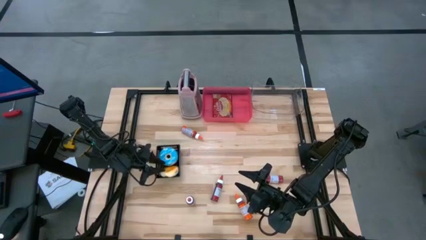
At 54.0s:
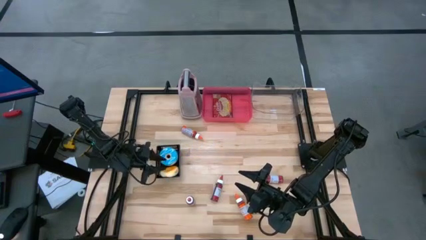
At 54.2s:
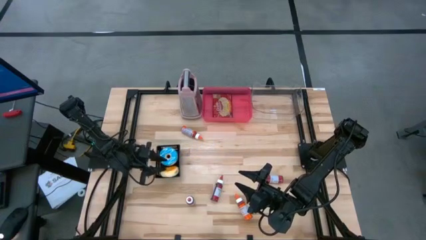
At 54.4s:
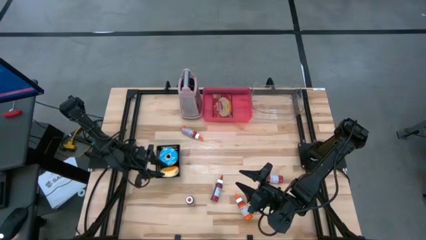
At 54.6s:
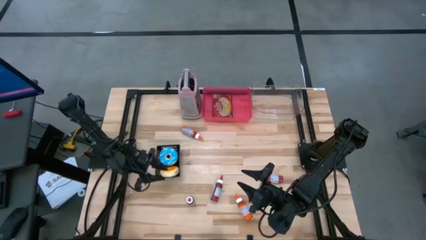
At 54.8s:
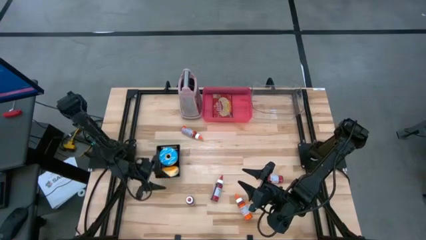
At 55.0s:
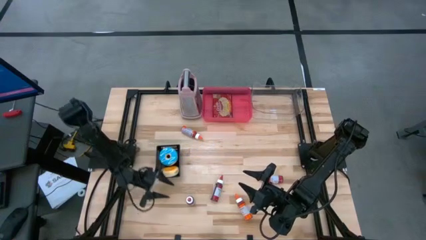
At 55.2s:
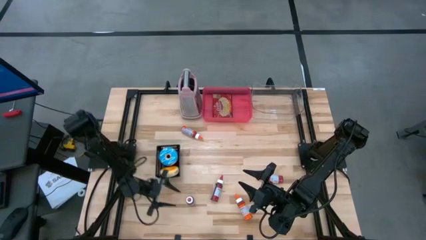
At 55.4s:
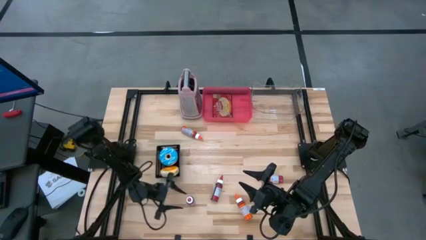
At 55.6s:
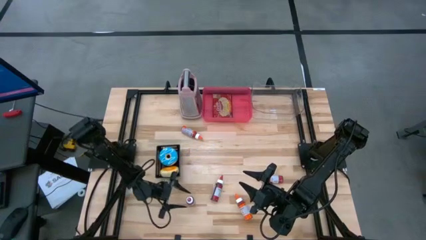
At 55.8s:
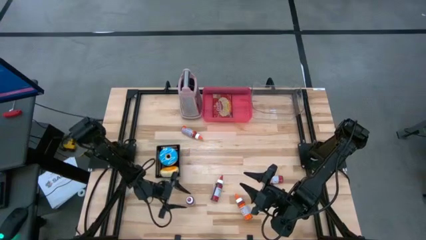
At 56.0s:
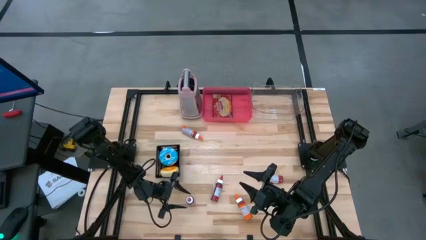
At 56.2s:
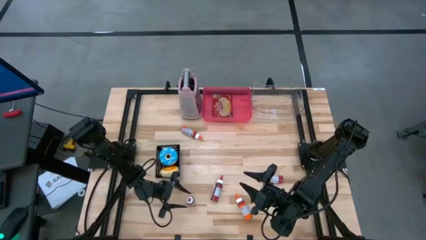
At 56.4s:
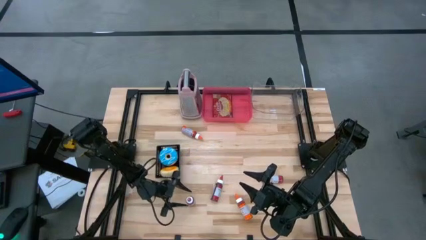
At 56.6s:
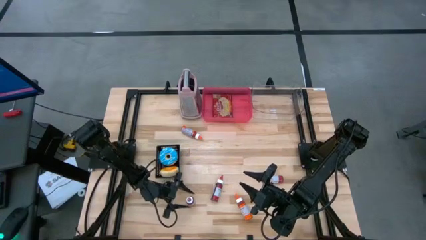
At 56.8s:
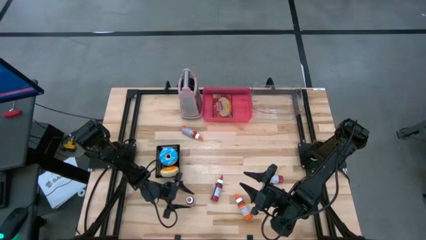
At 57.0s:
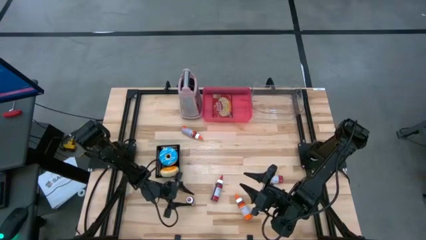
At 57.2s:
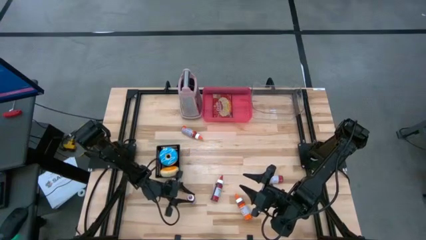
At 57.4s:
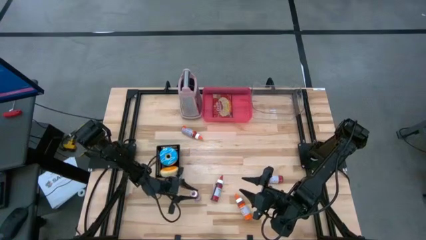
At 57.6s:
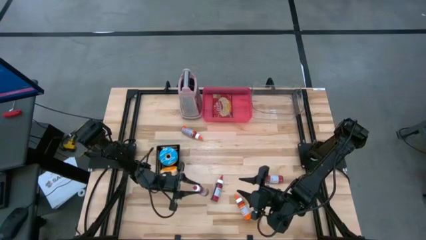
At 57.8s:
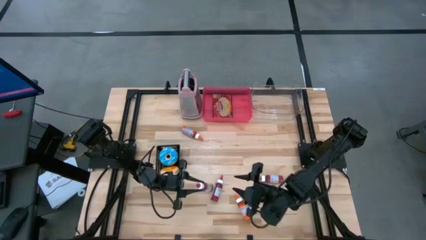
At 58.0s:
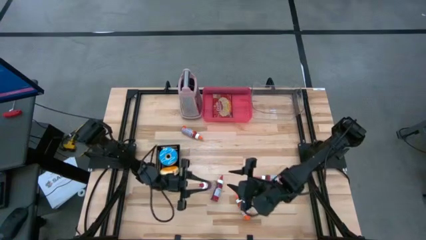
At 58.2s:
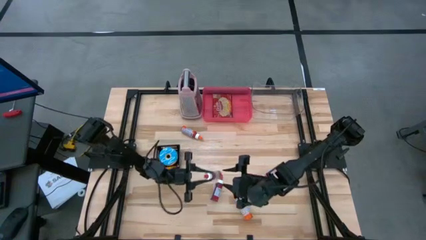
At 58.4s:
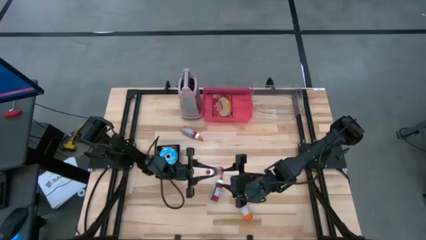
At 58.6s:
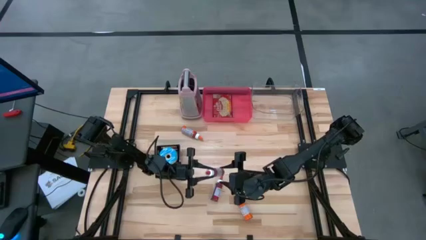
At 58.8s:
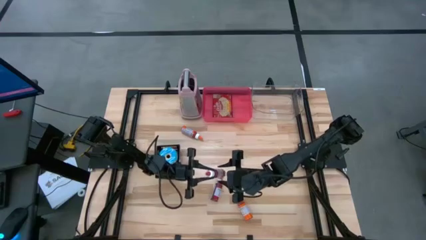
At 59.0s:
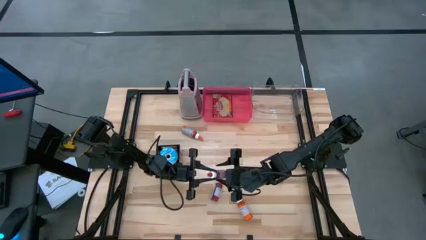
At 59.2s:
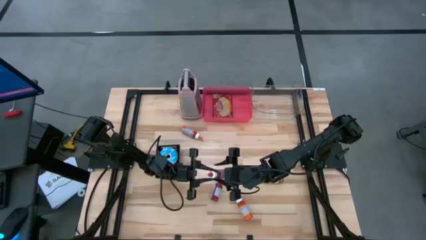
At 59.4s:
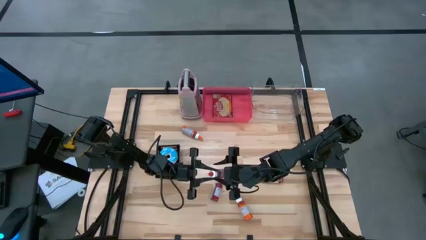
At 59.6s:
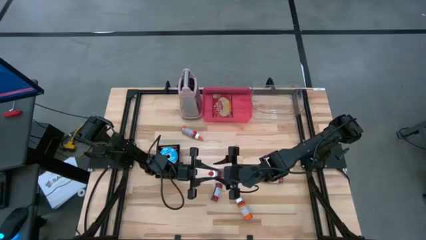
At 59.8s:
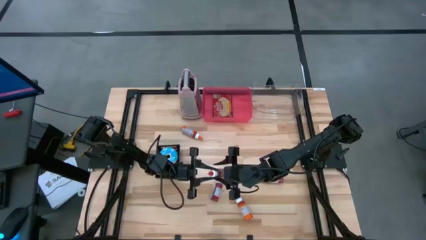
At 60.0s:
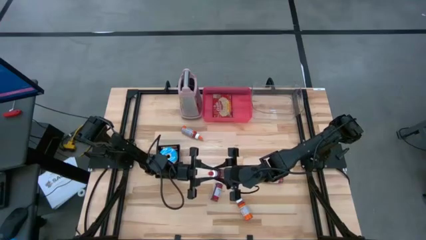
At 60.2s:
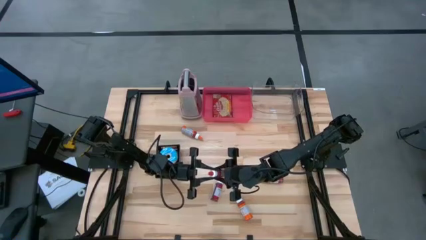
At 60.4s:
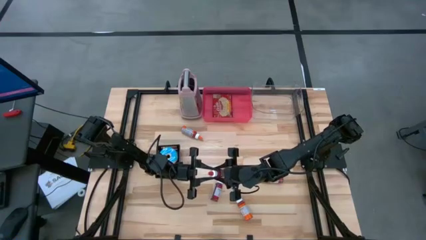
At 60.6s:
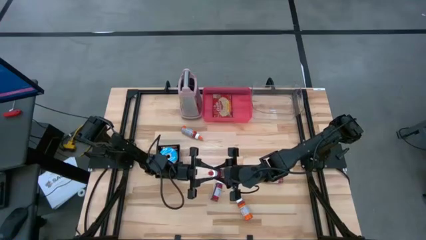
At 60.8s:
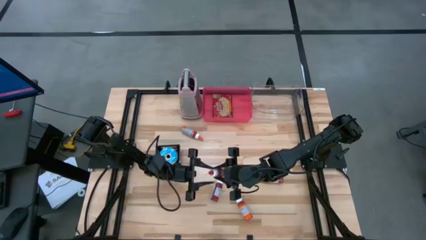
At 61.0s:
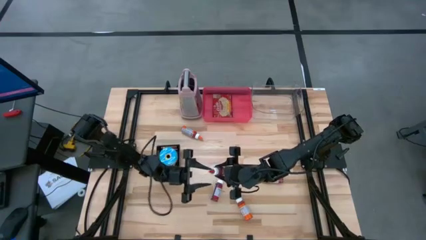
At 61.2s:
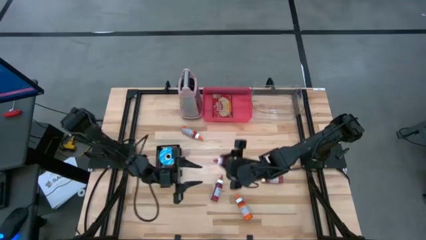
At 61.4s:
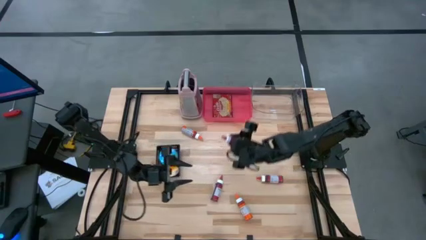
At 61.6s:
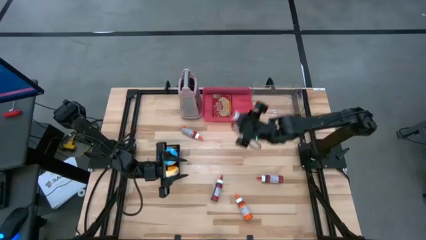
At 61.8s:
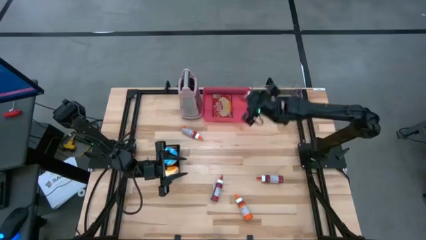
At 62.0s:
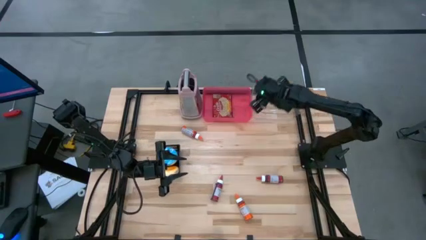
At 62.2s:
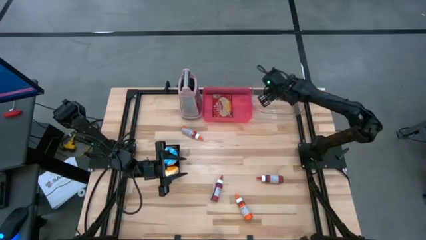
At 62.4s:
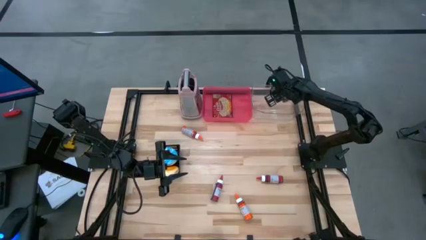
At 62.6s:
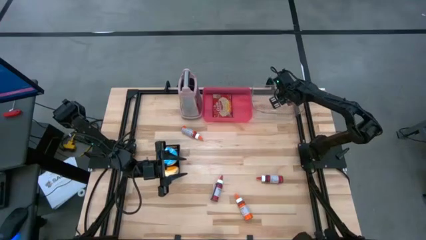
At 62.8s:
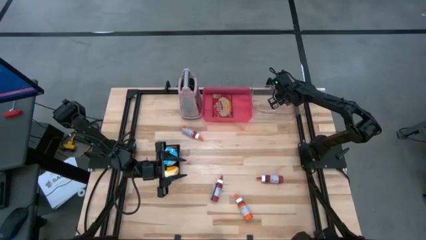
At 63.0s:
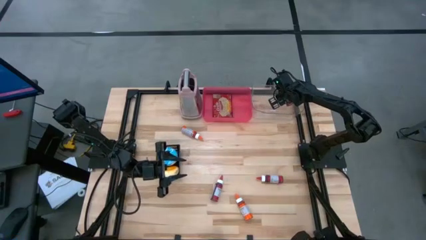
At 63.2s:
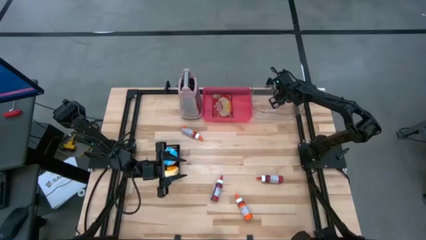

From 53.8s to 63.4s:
Put the left red food coloring bottle into the transparent bin

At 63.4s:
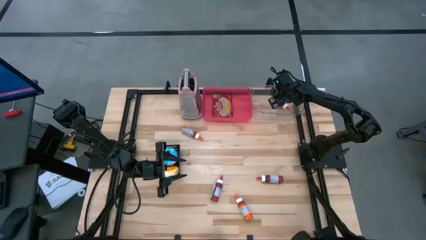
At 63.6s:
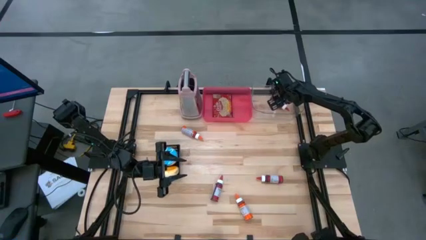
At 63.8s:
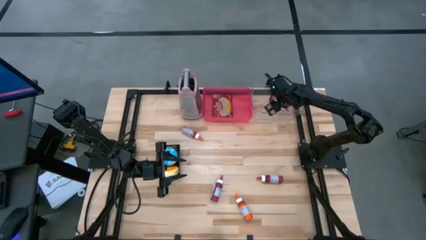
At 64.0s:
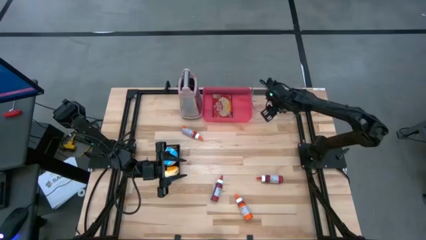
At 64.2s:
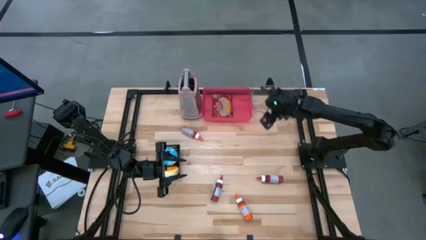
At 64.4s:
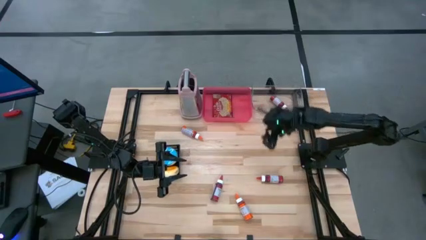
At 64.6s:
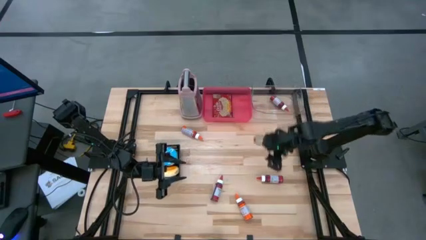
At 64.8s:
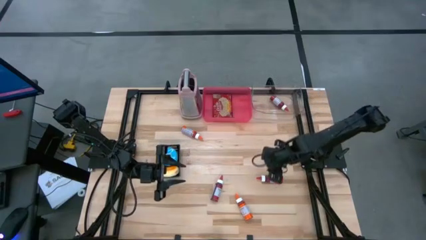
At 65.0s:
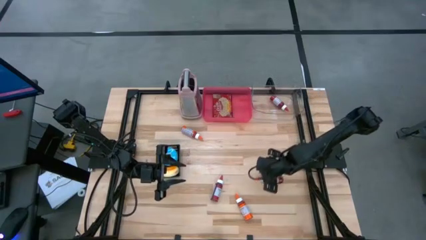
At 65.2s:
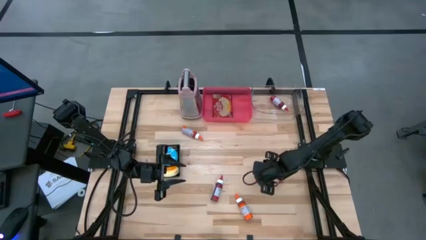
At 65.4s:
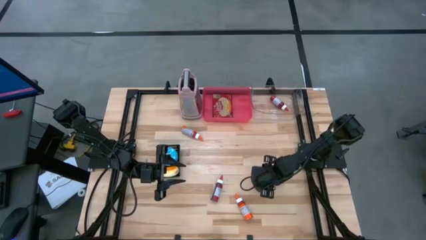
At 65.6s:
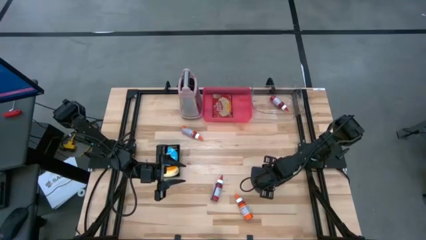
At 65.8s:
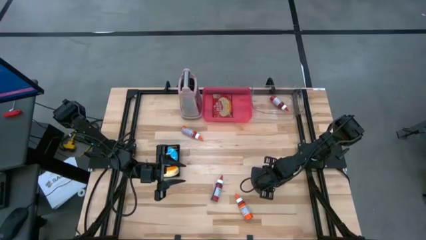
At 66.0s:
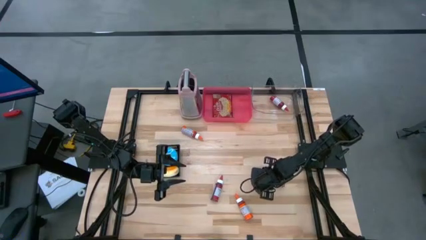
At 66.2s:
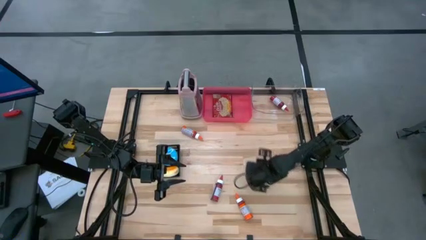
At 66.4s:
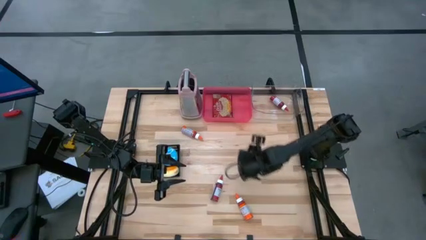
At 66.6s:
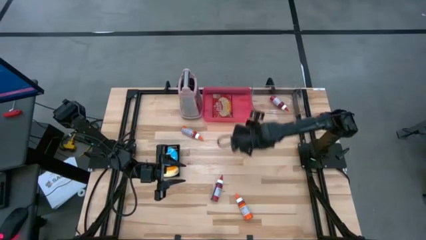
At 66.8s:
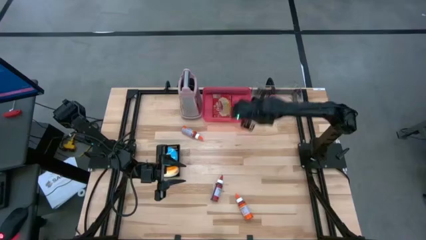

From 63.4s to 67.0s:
Put the right red food coloring bottle into the transparent bin

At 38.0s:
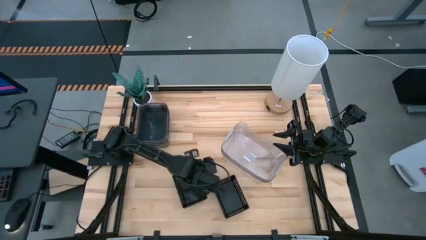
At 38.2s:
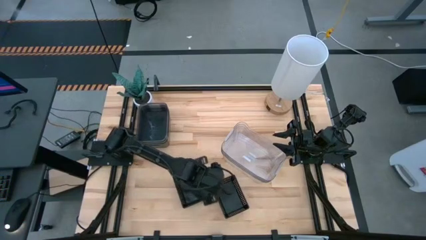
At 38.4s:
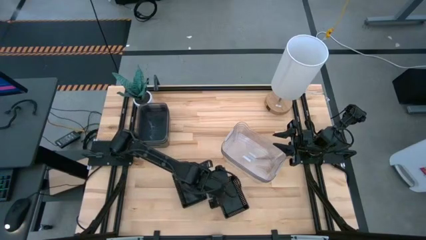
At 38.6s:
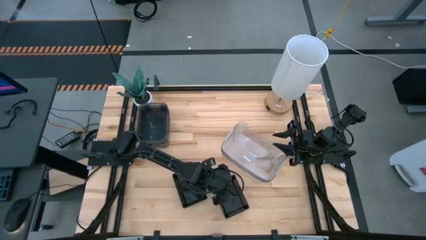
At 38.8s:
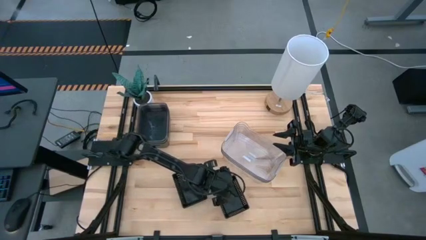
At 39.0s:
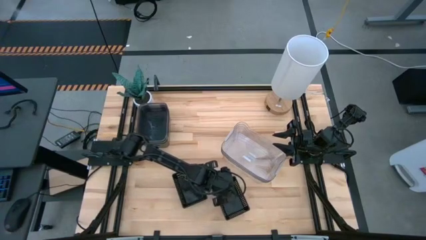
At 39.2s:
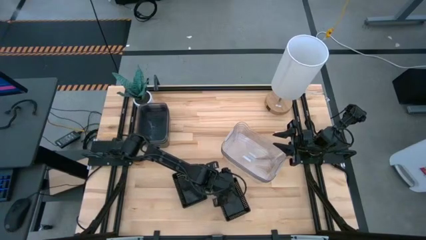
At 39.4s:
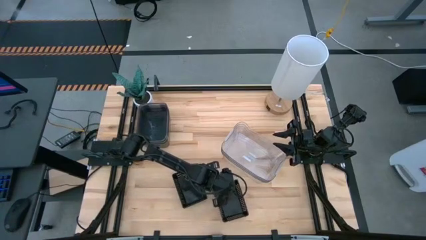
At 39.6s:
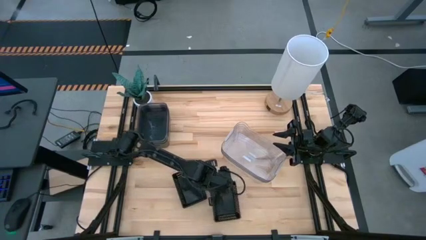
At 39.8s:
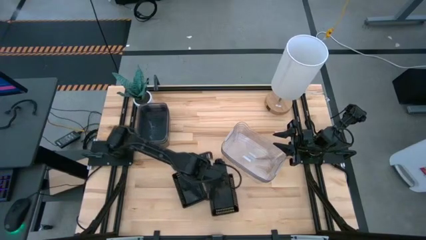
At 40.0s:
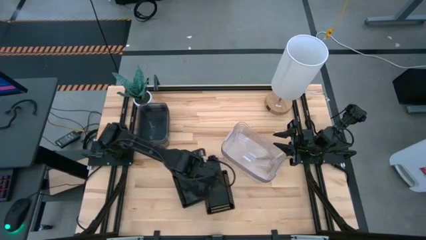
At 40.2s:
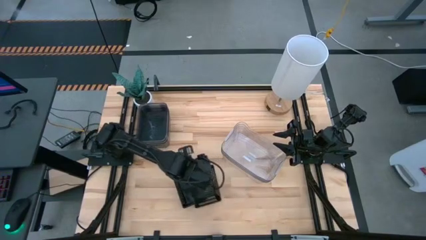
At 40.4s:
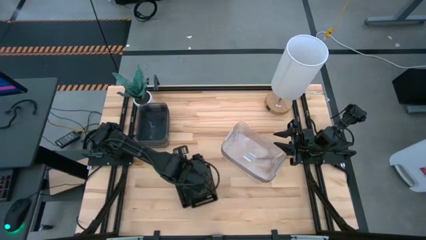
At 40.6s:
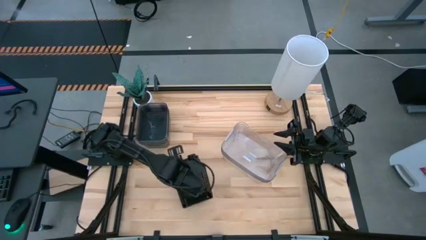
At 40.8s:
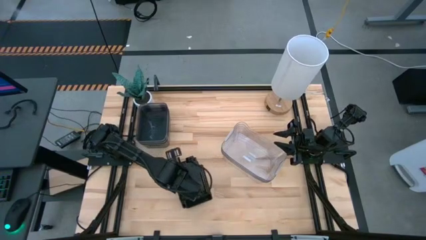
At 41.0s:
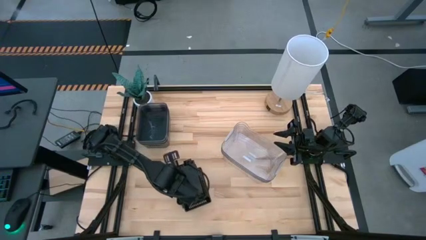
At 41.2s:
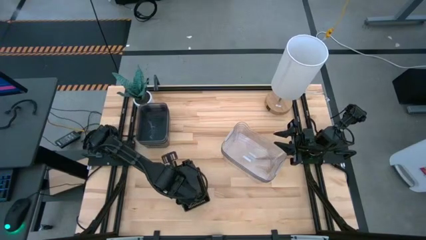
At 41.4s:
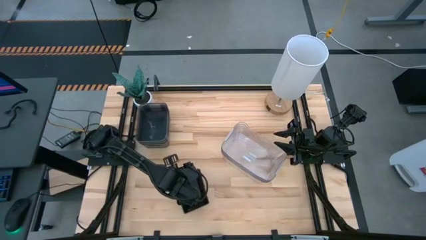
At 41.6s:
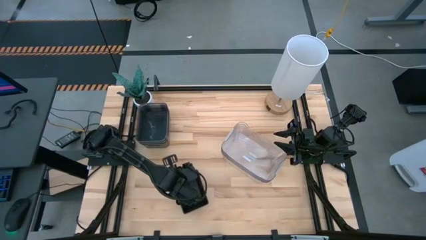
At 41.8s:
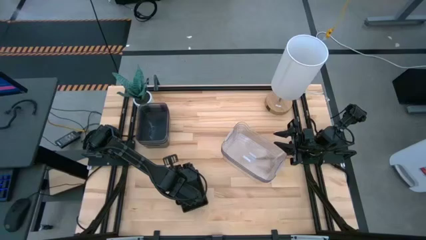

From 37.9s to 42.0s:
Stack the right black bin on the left black bins
